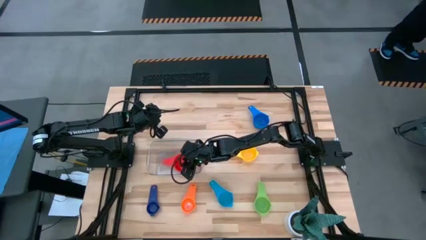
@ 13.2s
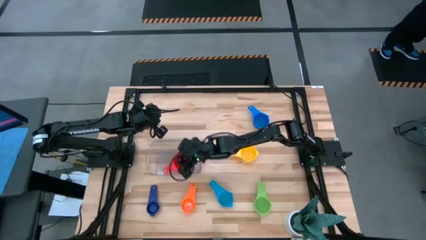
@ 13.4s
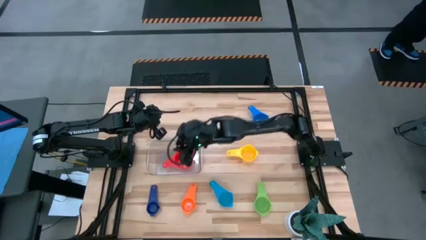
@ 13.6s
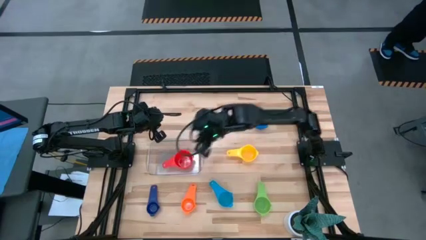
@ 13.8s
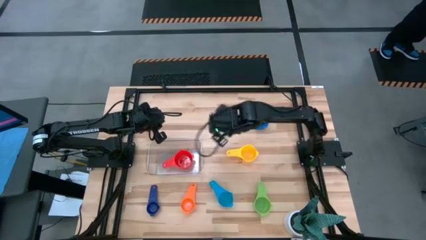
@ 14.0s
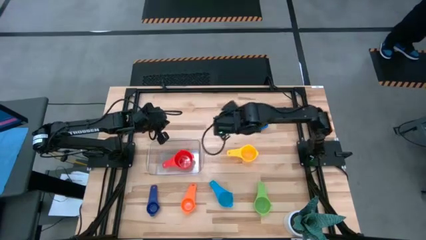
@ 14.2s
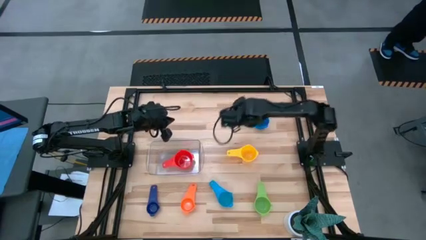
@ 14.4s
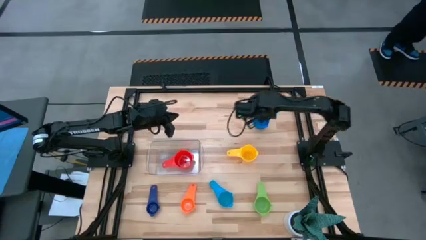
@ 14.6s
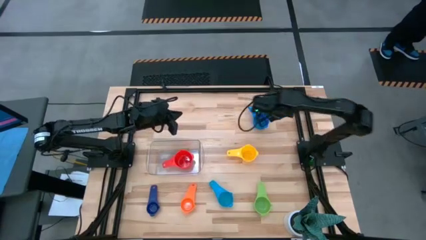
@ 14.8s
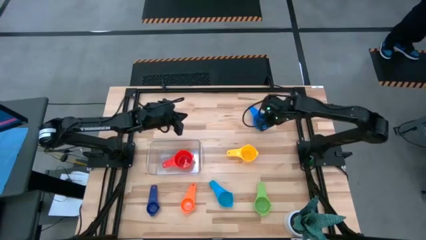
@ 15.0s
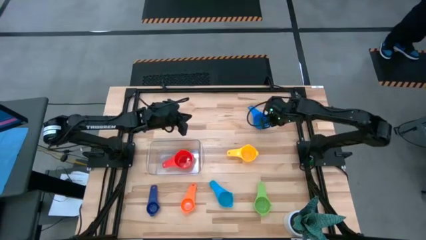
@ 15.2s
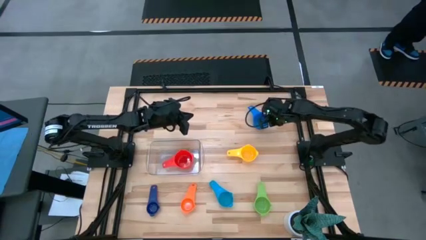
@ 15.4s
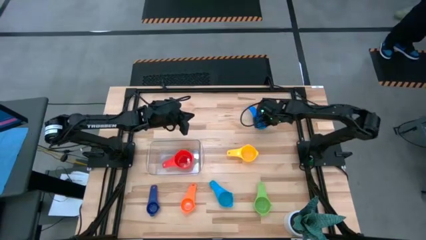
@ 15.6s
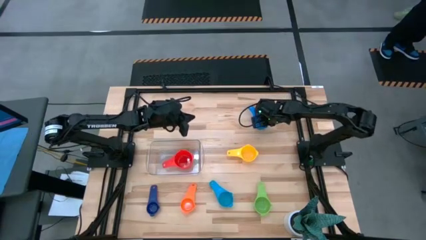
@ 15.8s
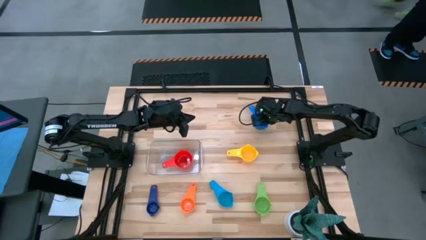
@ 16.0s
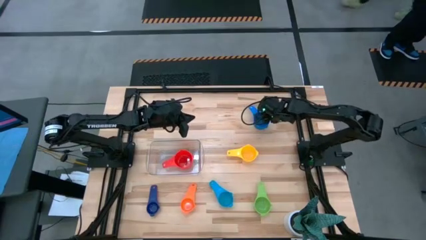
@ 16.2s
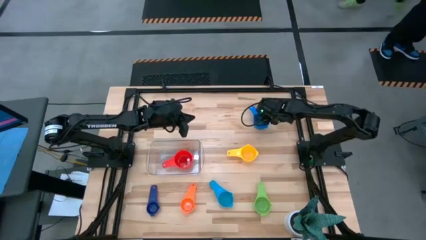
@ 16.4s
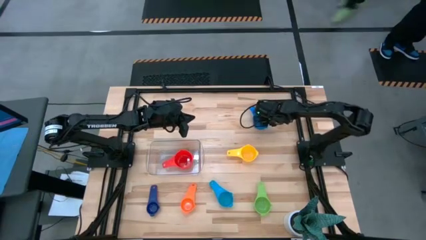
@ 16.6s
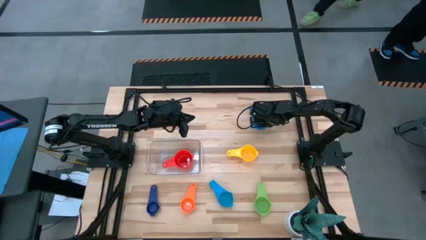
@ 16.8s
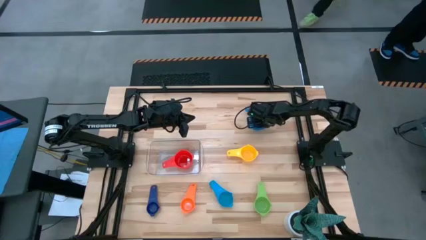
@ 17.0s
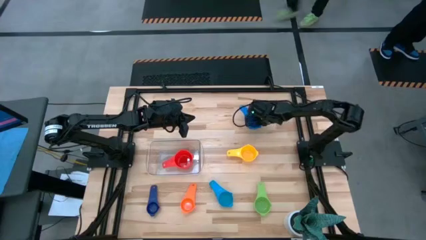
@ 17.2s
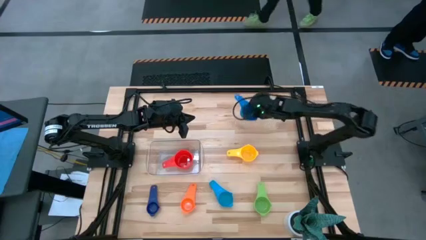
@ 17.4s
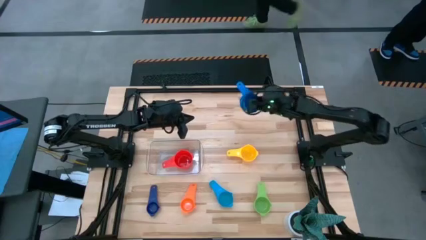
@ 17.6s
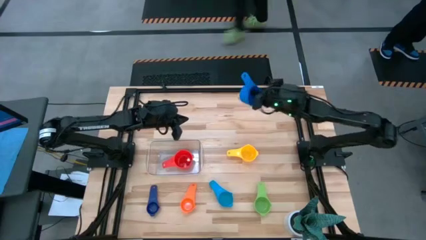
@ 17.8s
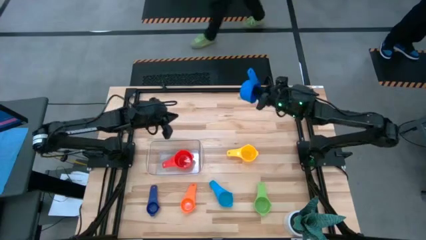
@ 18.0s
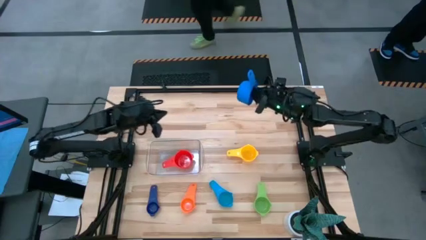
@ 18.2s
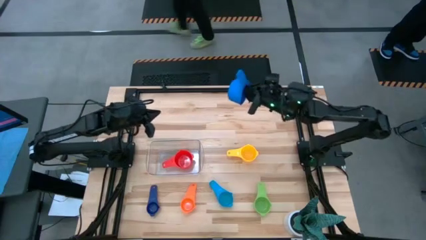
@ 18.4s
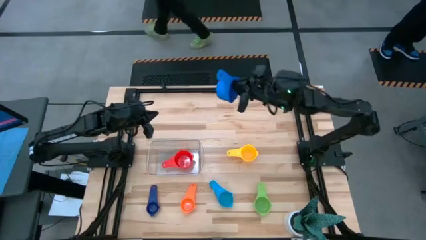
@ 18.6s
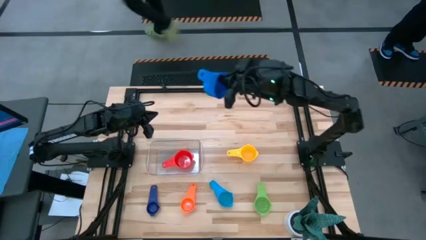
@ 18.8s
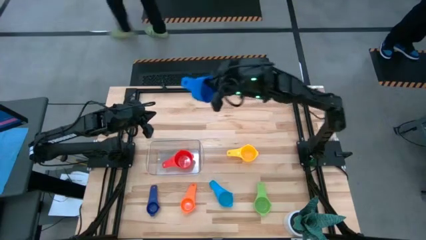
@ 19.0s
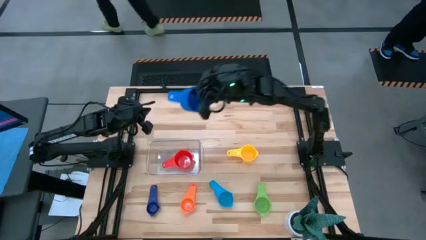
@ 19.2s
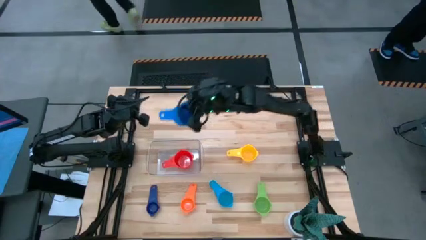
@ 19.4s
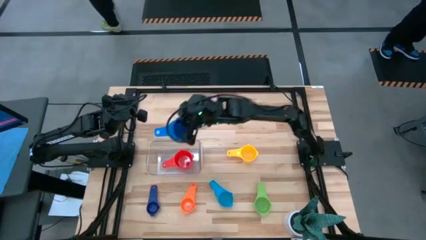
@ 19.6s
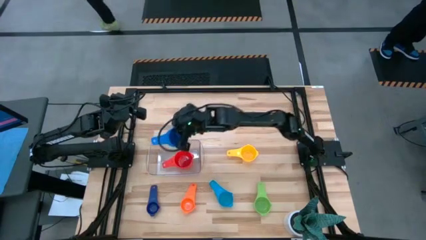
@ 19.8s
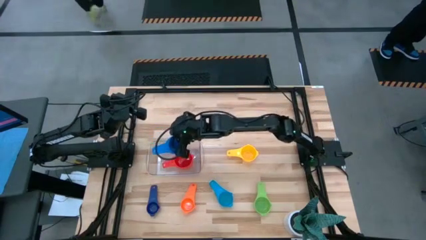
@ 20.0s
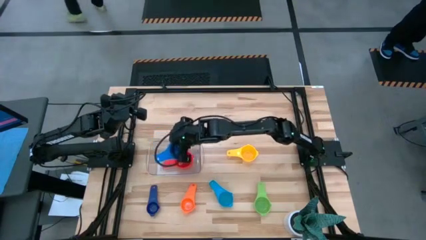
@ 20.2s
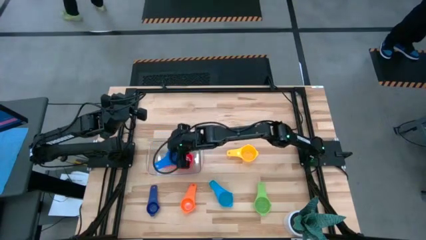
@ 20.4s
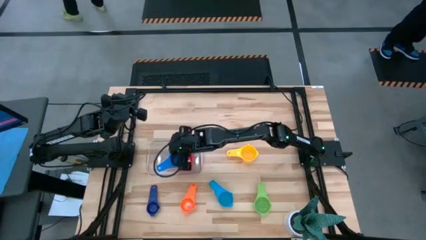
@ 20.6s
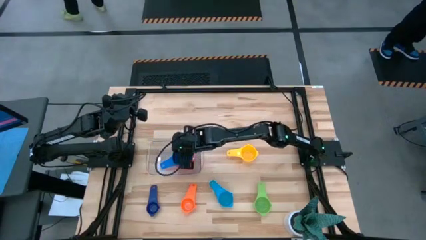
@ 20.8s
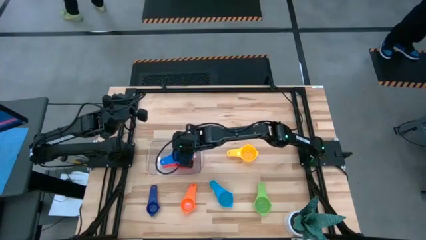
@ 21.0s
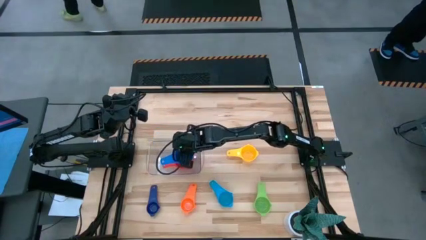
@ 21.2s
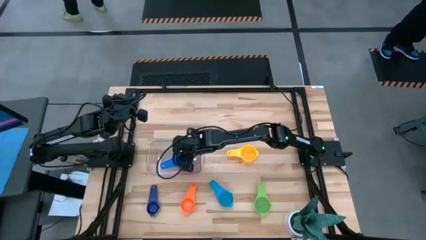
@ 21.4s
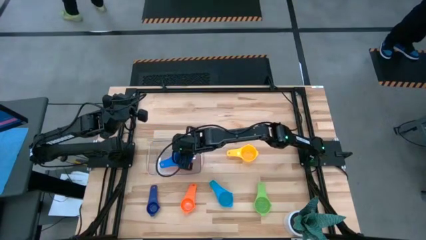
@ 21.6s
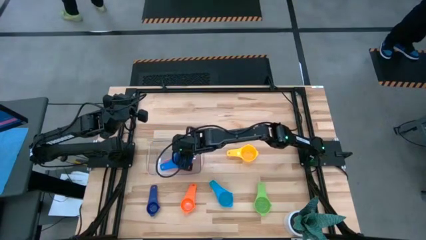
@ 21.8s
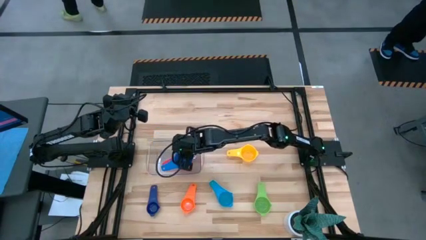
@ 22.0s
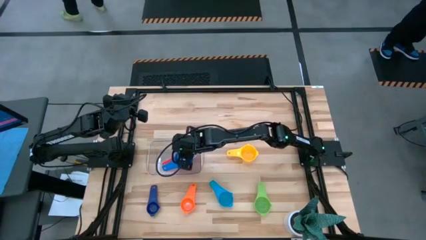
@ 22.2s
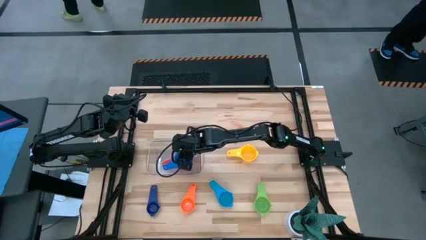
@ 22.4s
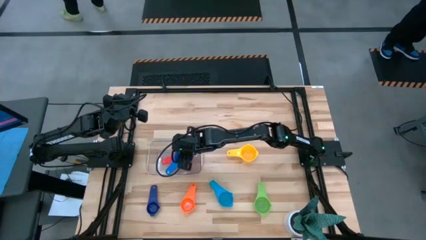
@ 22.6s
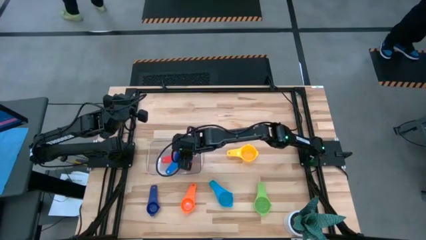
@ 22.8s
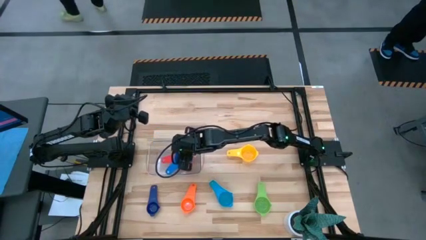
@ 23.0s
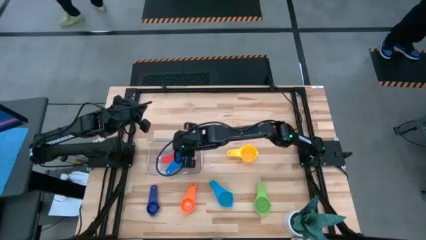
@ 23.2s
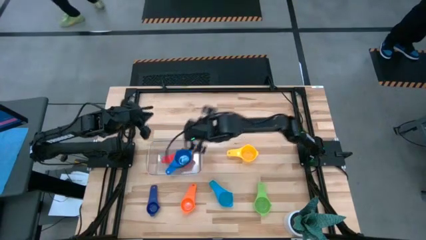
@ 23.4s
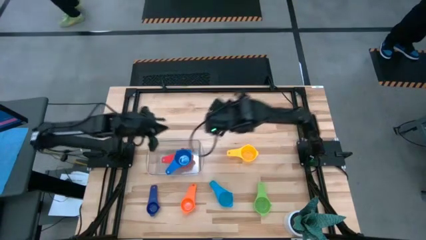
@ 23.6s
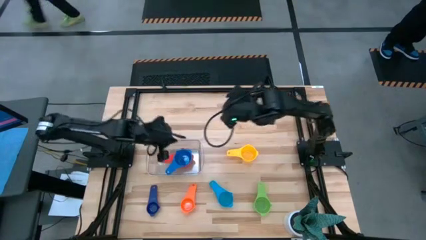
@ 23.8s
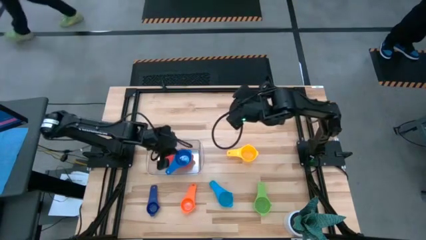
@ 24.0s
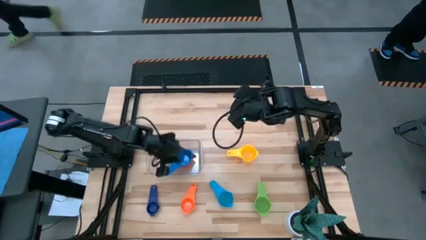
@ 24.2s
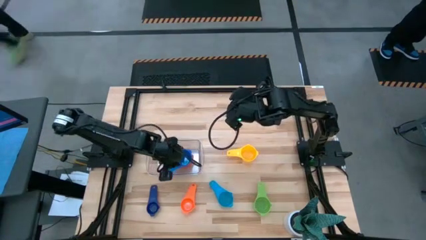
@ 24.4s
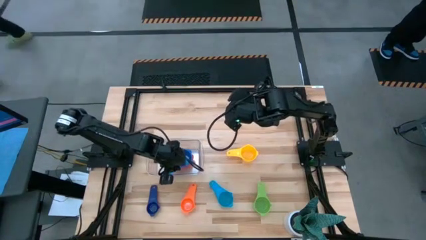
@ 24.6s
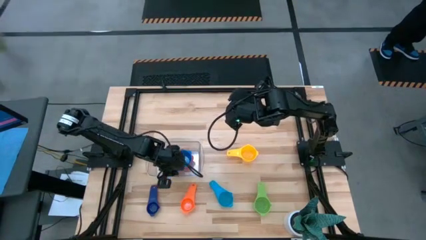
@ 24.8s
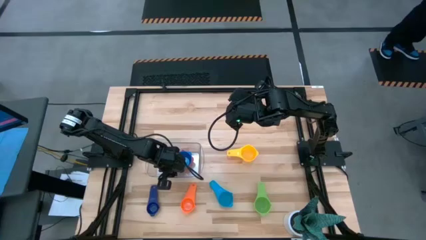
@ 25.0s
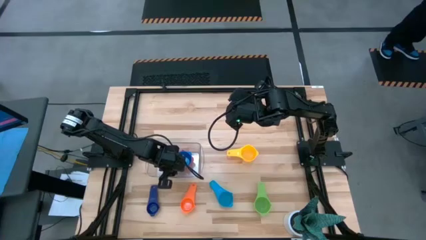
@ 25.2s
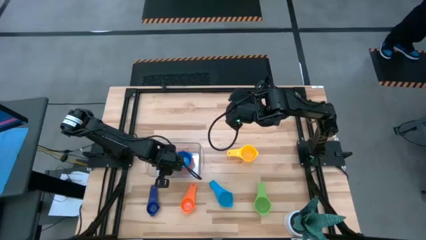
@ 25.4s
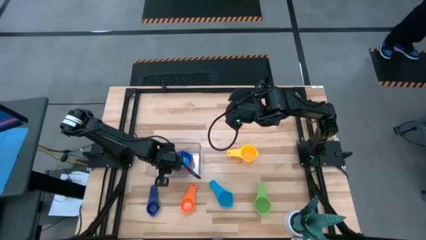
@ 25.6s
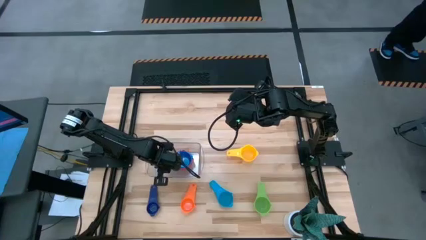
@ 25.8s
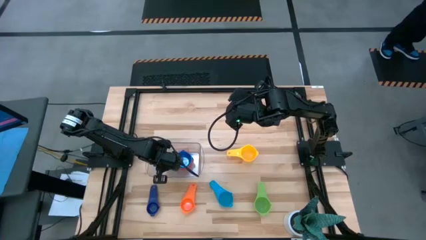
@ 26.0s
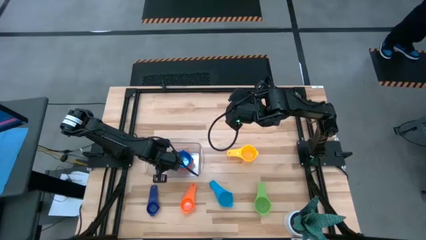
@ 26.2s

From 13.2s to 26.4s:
Task: Nest measuring cups in basket
Stack the blue measuring cup on top the red measuring cup in the transparent bin

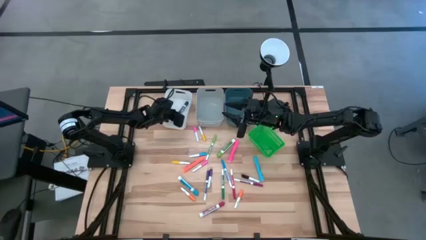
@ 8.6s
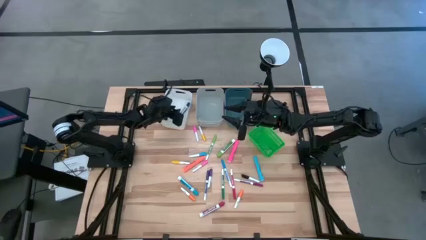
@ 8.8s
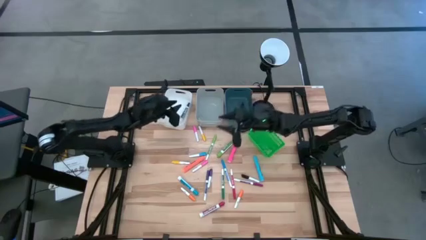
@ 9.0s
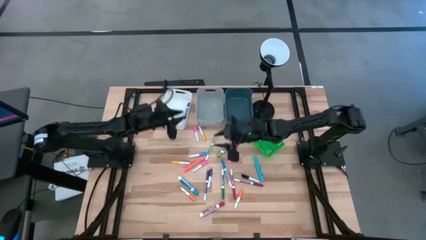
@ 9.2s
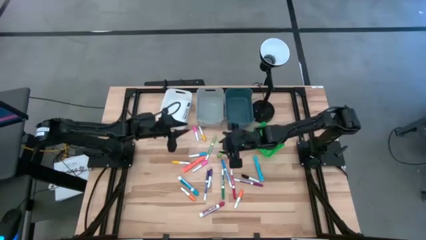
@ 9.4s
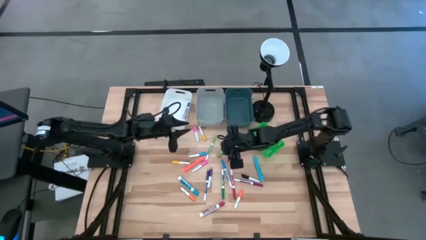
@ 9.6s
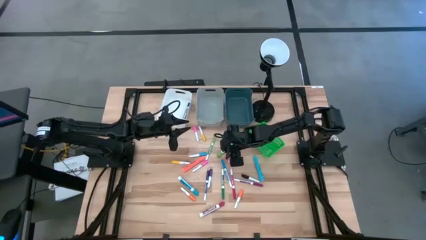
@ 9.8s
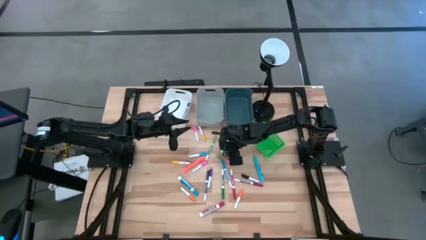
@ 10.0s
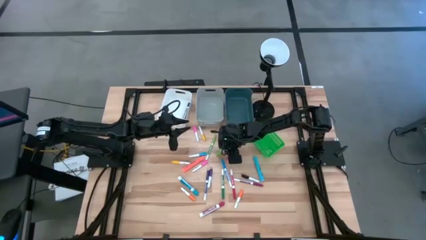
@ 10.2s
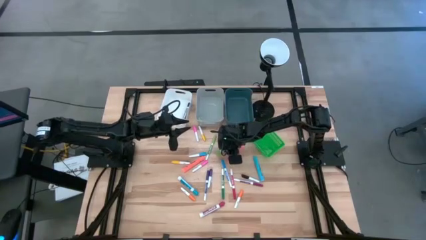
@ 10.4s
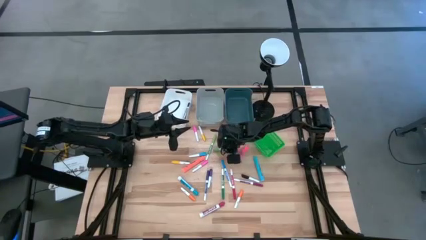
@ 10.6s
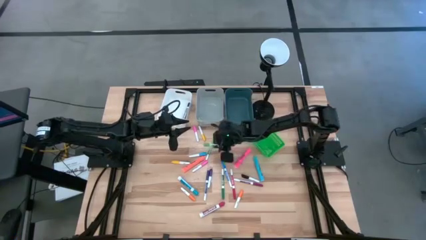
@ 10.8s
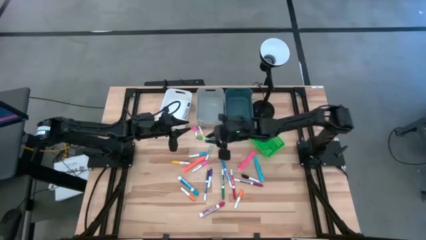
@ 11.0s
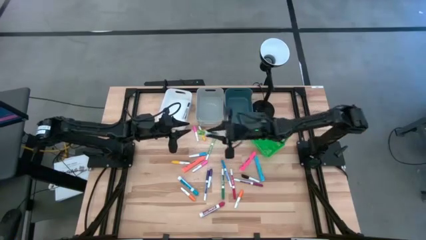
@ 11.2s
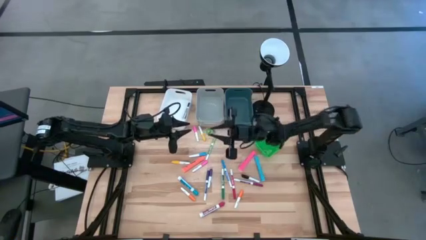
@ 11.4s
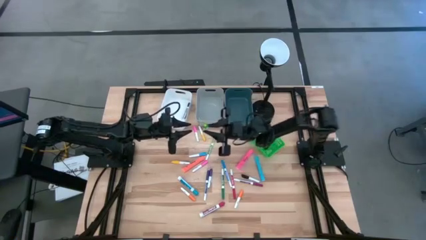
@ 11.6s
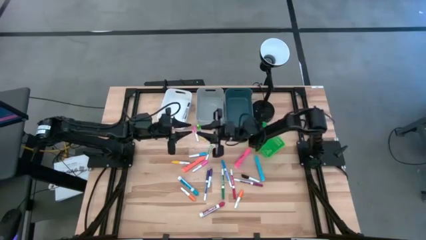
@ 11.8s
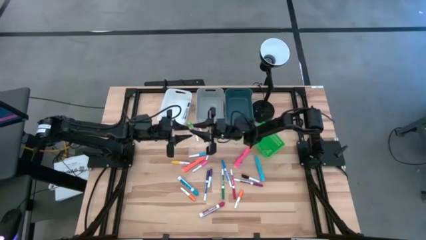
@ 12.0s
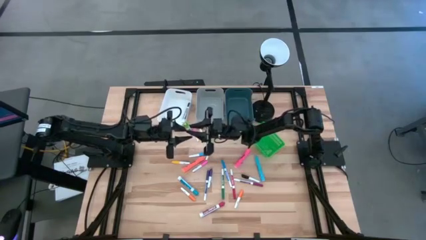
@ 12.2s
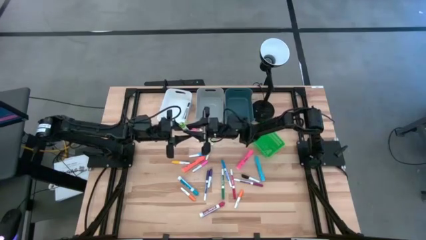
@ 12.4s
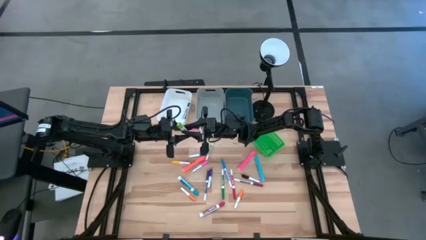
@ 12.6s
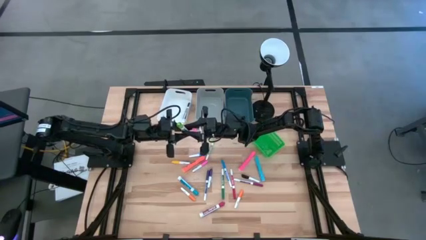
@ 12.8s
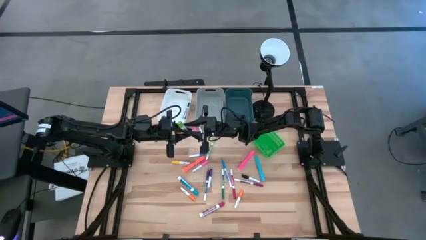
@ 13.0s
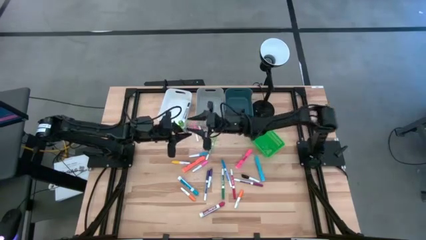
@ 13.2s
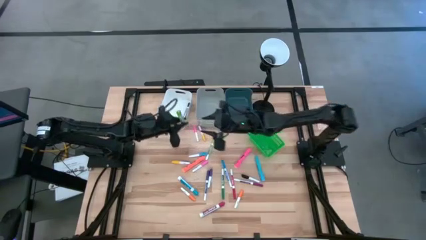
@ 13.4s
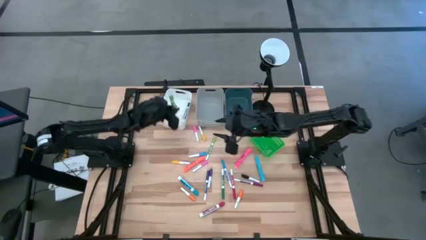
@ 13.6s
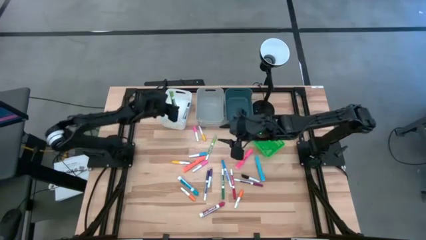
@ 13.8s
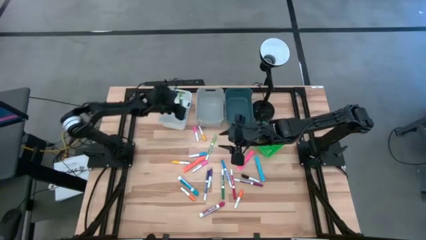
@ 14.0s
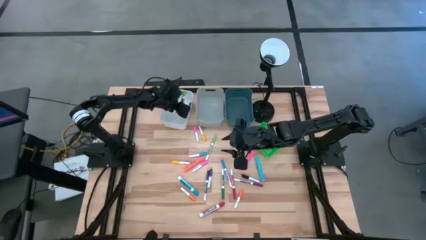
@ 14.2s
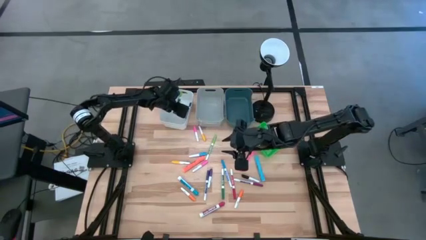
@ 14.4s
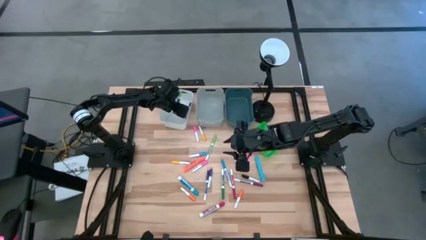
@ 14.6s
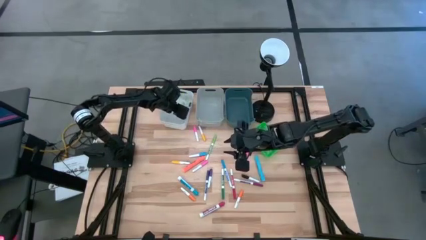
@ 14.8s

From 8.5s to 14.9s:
Task: Pick & Place Markers
Put the green marker pen into the white bin
